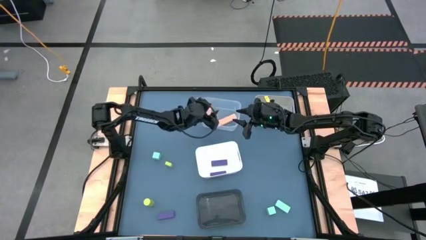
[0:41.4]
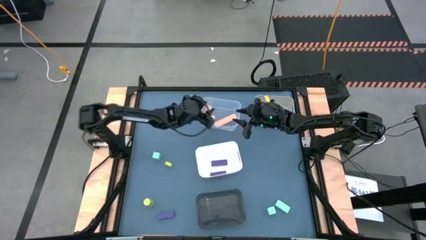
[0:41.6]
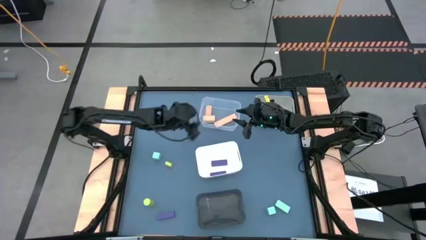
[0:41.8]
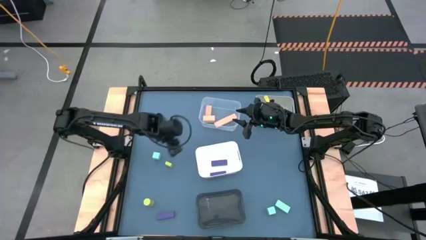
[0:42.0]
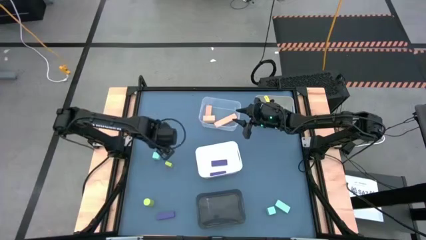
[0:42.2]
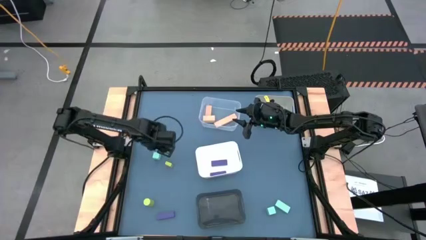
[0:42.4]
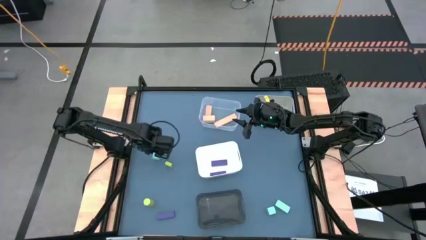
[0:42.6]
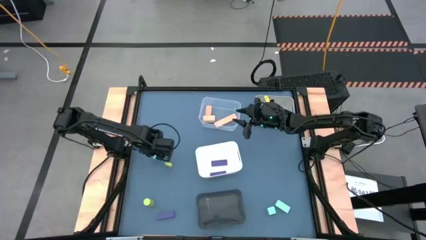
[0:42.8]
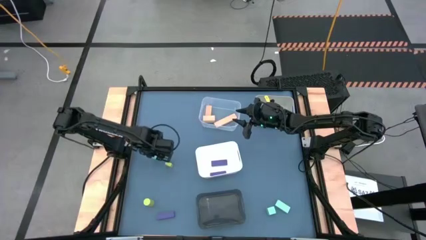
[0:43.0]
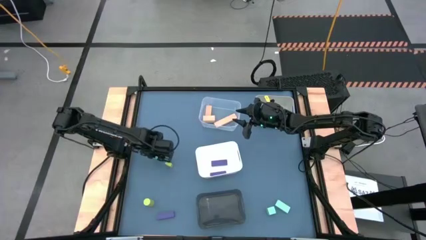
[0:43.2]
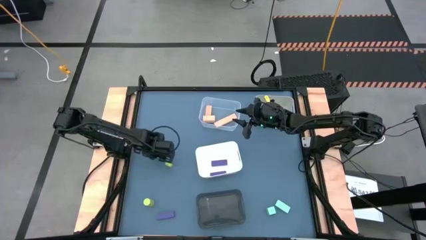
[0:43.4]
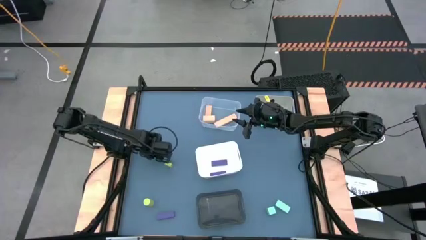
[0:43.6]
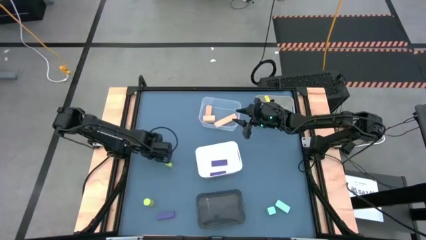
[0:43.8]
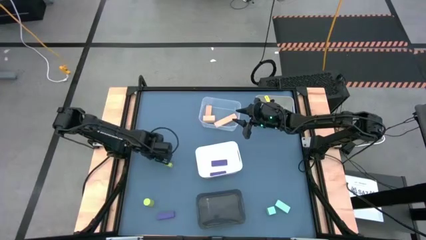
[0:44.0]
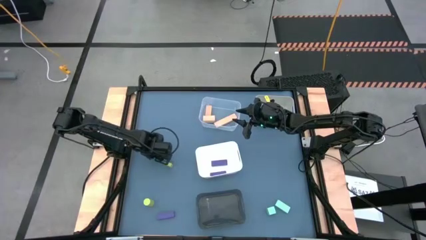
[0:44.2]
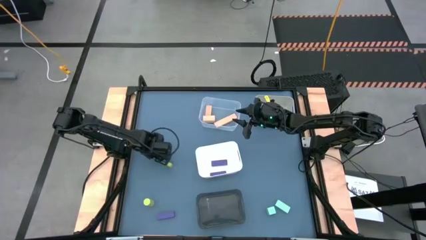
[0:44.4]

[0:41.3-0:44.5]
Task: Sort & place blocks by color
Put the top light-blue square block into the transparent black bin

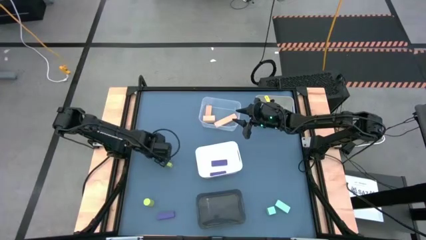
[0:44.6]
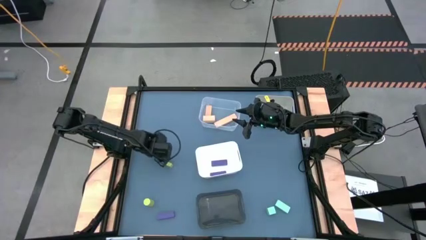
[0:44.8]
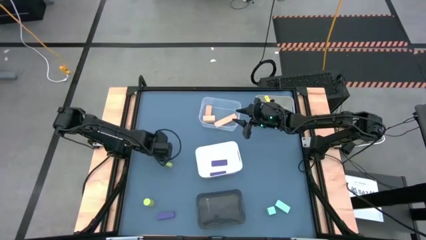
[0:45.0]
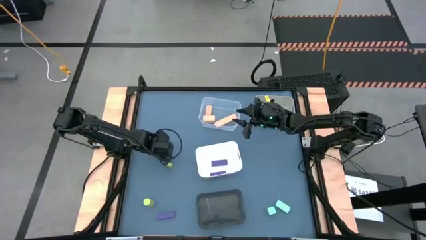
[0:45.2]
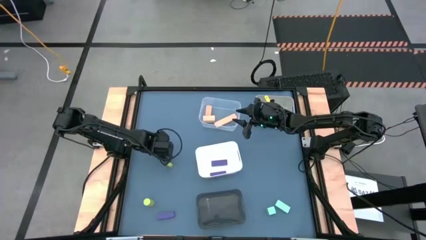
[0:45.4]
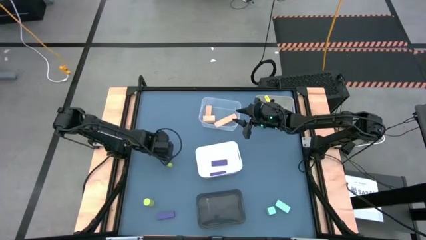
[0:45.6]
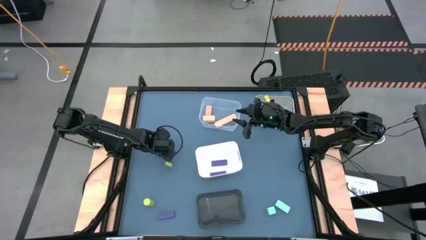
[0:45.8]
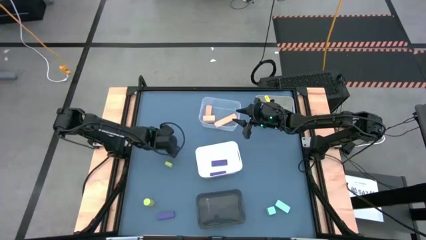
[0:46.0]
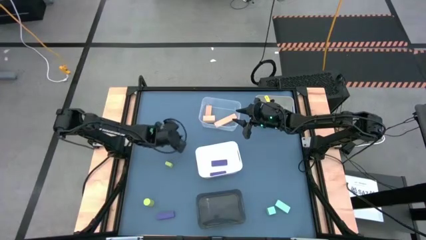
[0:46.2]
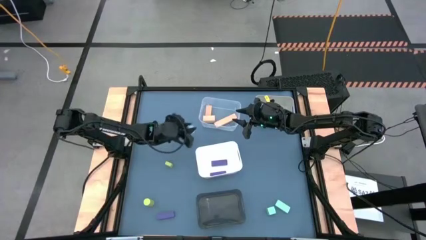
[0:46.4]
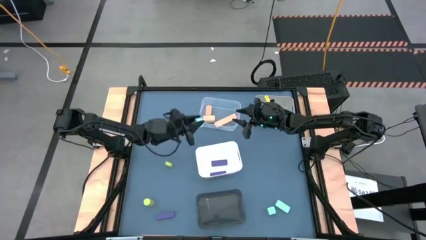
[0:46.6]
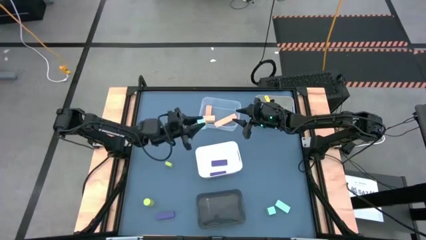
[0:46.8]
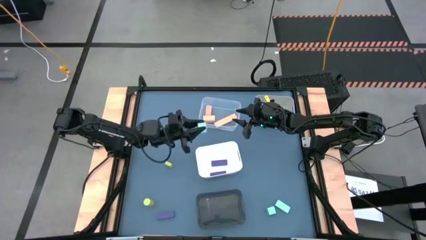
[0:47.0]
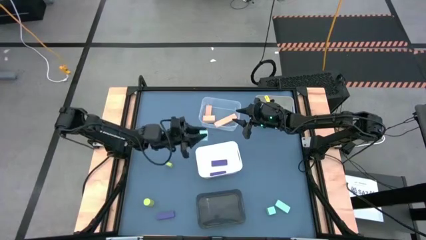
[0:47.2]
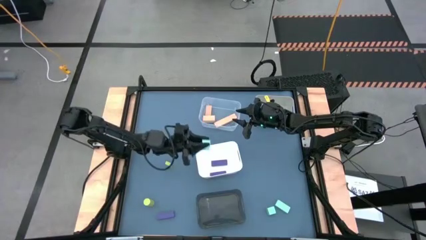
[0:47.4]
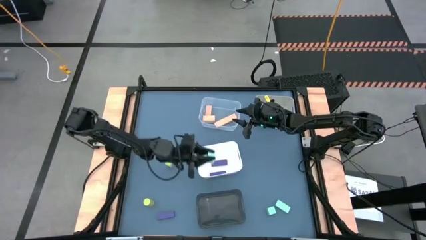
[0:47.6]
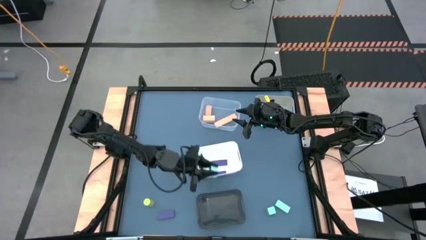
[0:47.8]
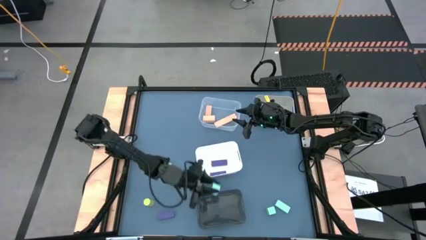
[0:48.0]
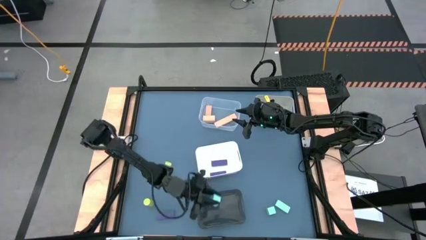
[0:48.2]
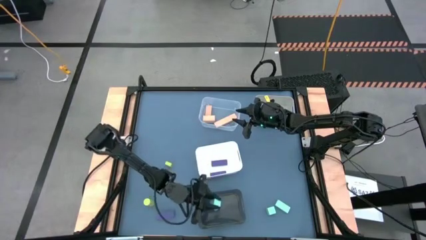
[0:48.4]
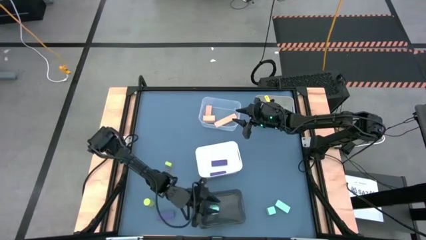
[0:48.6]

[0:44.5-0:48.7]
Put the top light-blue square block into the transparent black bin

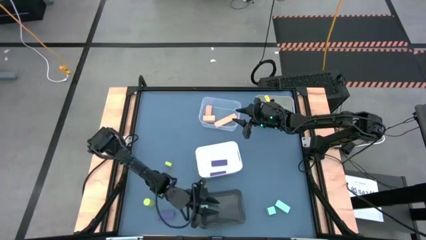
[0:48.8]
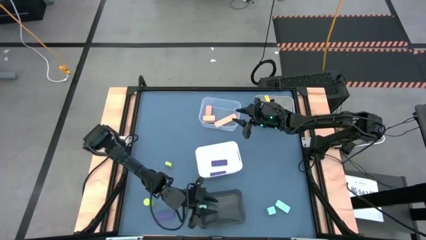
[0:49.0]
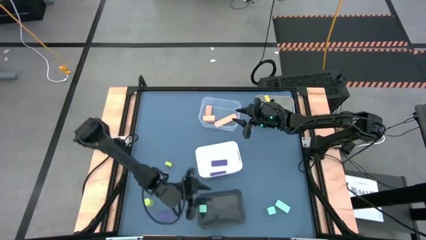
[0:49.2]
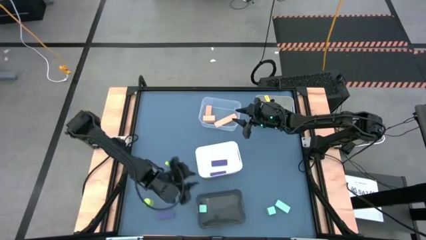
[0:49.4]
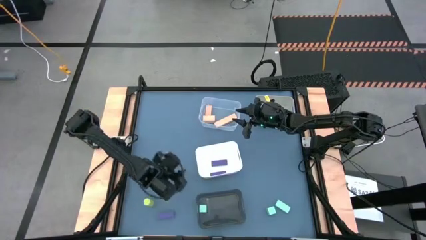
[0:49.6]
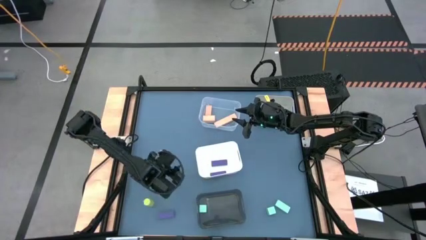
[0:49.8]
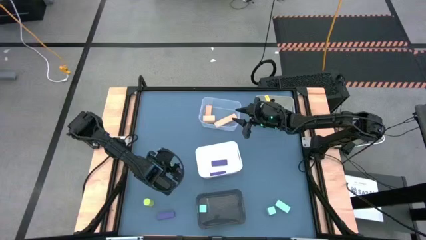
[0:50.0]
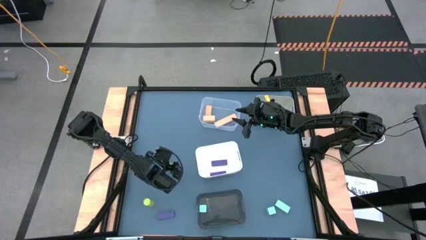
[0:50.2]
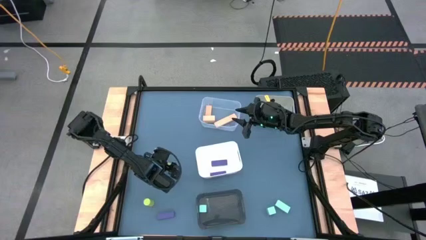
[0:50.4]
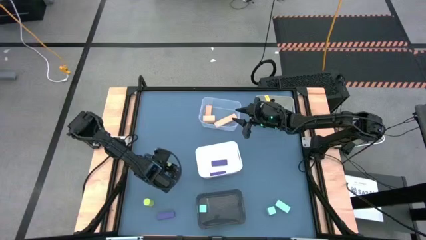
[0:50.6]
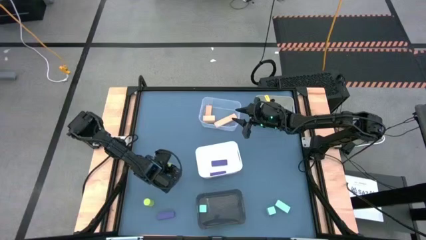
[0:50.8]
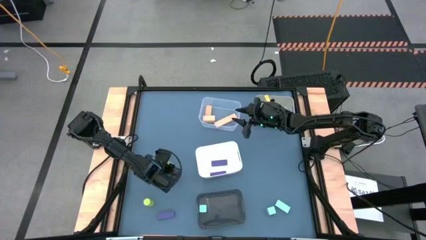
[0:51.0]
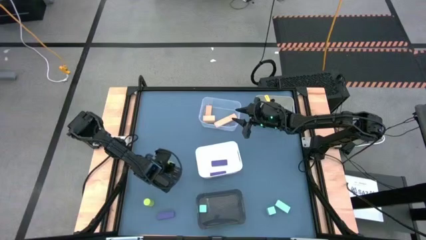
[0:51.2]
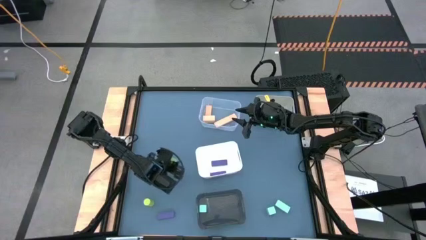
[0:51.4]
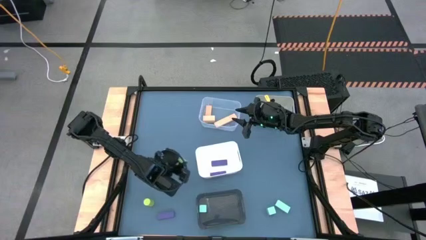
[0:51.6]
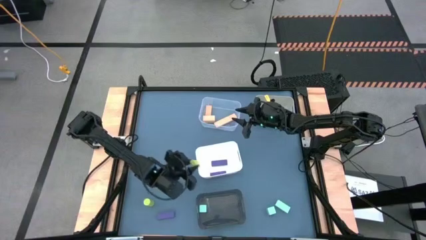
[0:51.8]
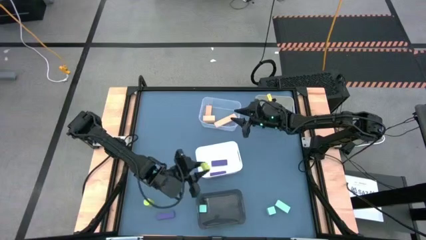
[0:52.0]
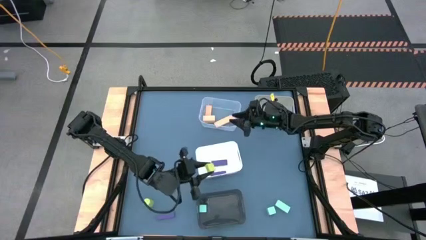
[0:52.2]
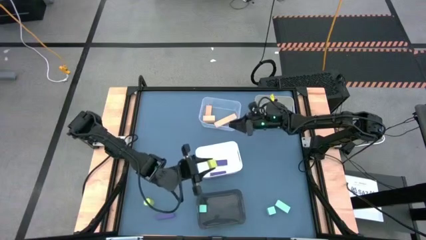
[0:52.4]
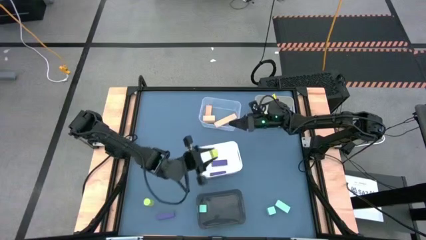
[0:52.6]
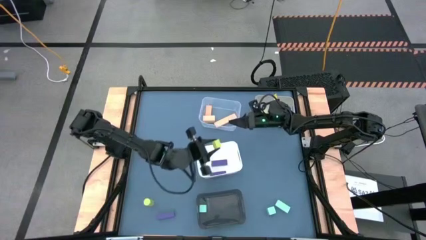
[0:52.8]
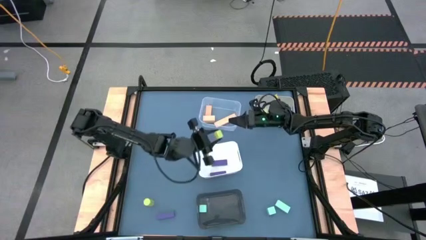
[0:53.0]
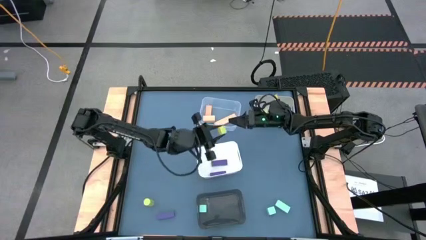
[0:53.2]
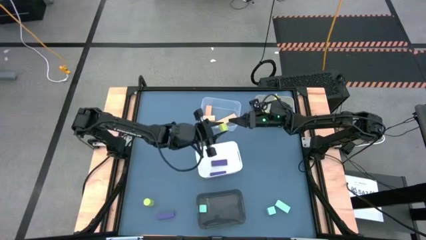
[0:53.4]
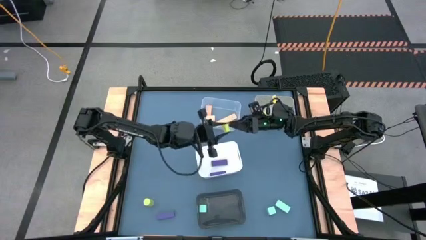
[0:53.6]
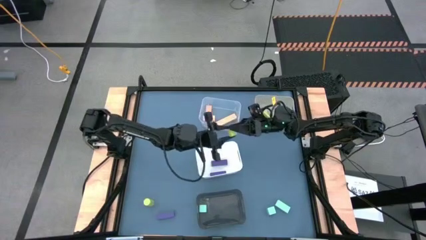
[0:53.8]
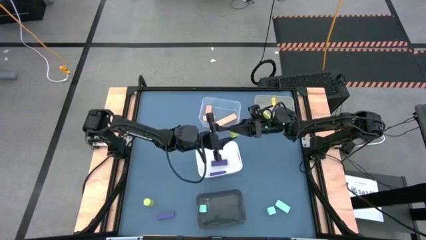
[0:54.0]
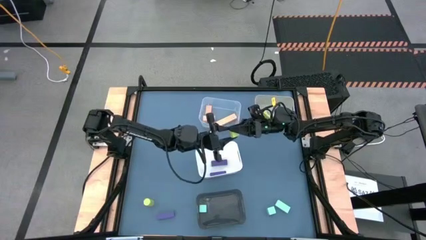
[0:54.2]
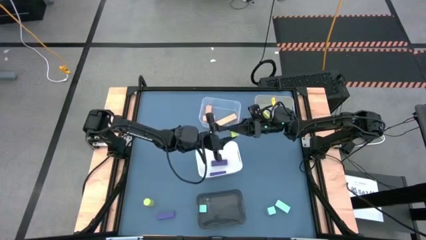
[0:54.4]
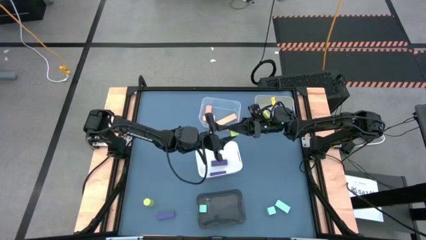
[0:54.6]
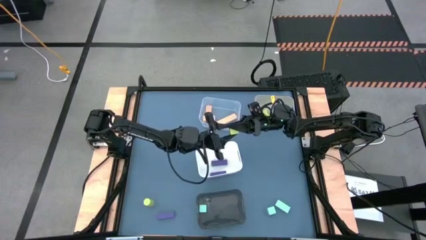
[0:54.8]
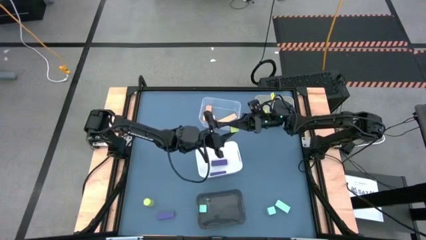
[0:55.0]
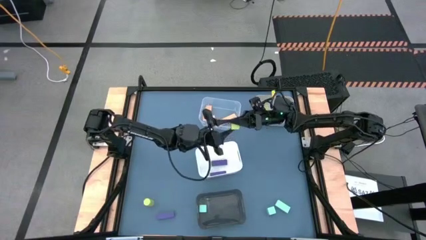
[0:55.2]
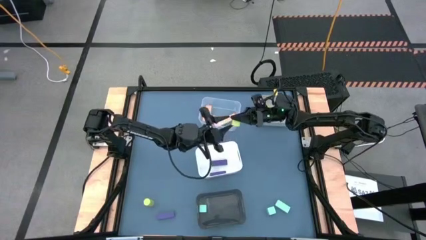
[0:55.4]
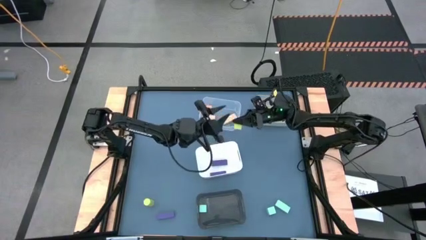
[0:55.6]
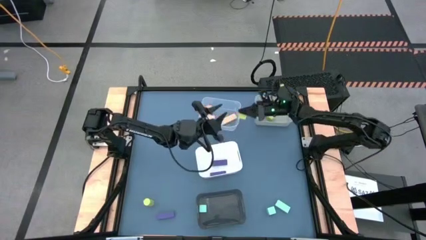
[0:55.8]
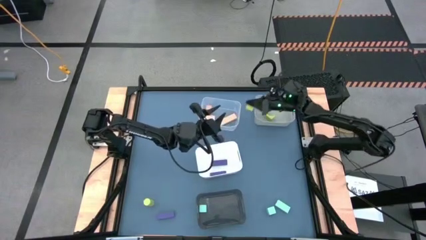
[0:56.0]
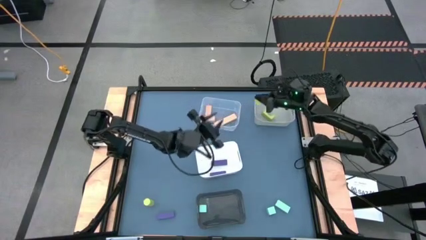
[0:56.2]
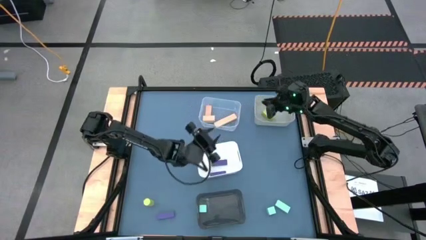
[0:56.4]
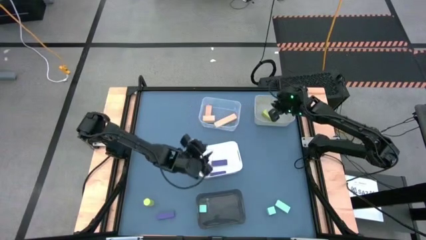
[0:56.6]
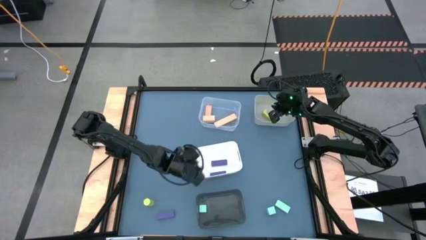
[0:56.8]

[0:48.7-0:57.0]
Put the yellow-green square block into the grey bin
